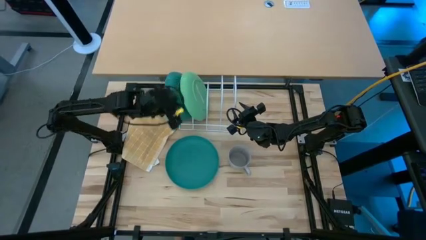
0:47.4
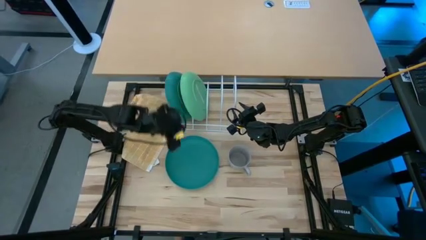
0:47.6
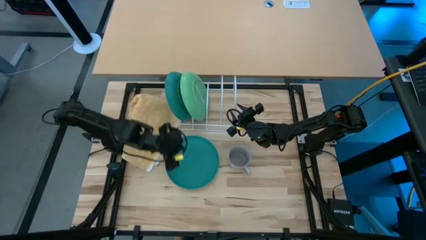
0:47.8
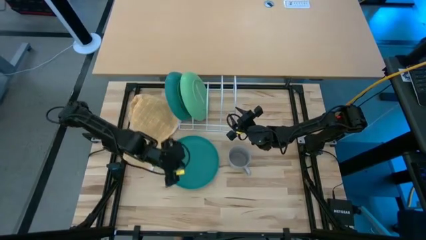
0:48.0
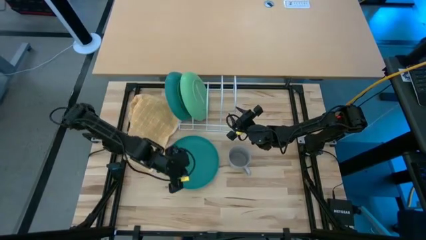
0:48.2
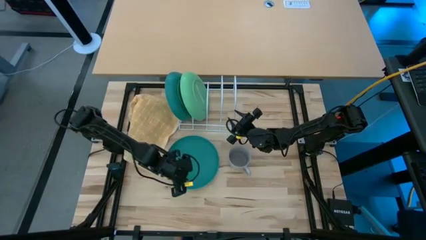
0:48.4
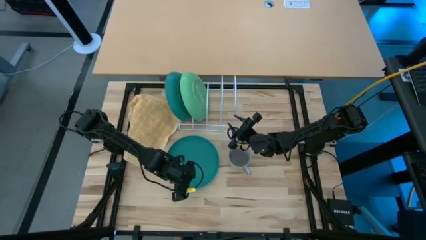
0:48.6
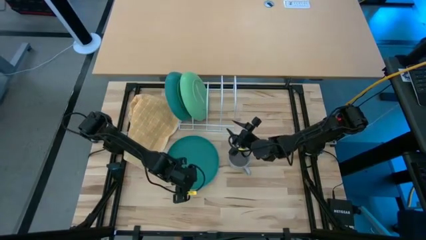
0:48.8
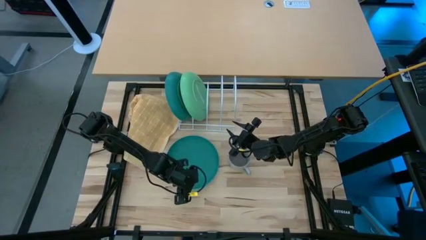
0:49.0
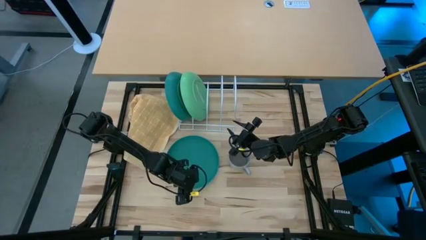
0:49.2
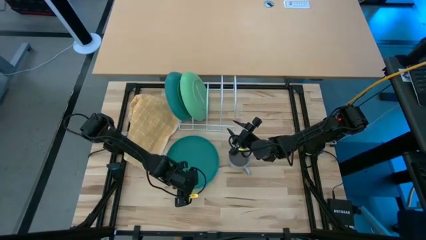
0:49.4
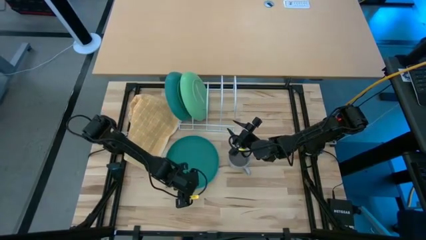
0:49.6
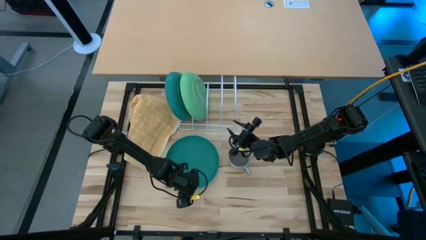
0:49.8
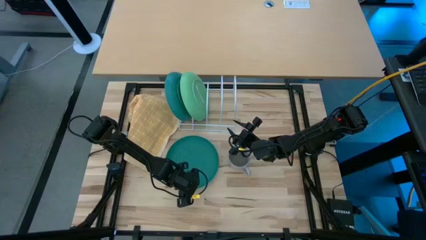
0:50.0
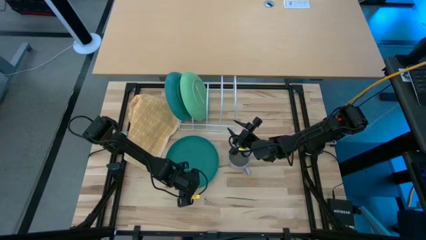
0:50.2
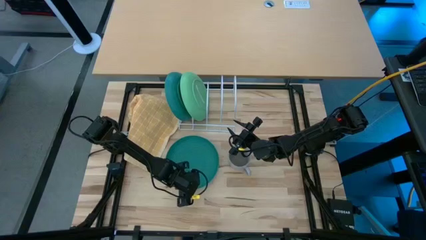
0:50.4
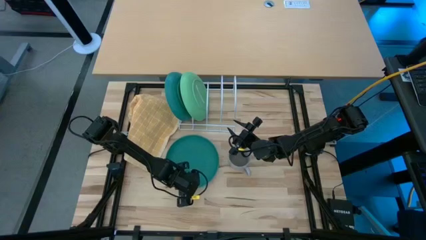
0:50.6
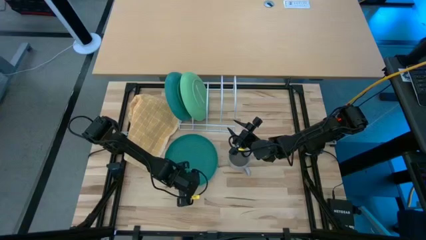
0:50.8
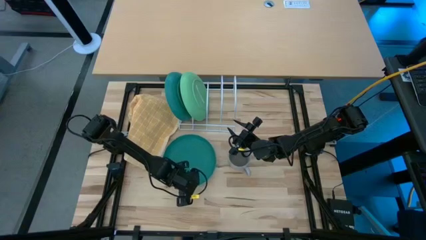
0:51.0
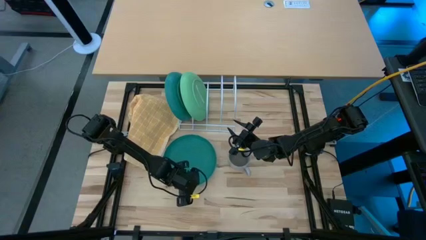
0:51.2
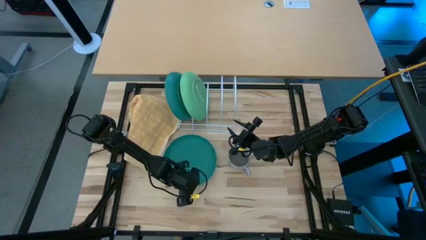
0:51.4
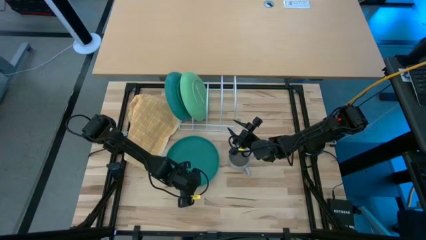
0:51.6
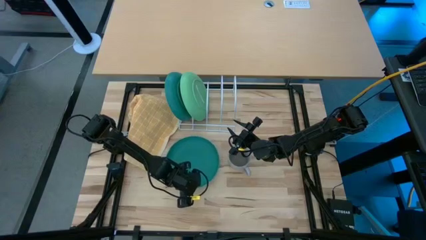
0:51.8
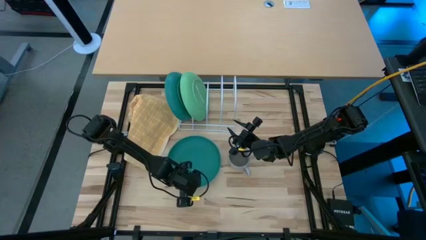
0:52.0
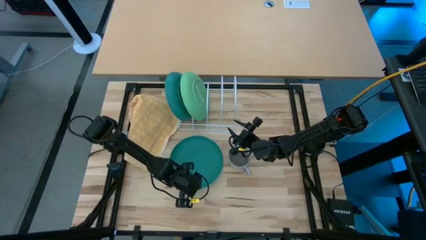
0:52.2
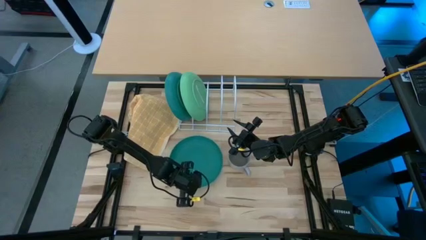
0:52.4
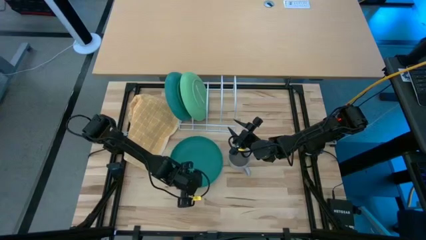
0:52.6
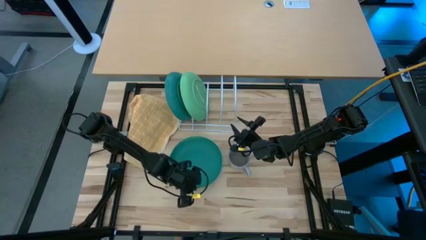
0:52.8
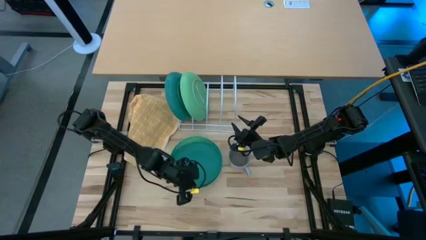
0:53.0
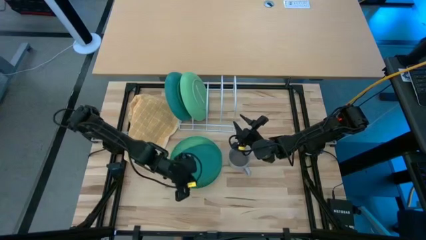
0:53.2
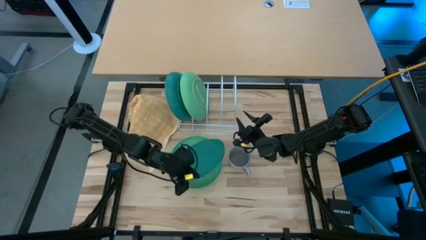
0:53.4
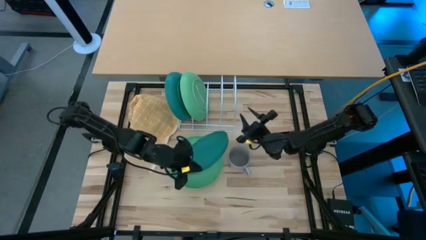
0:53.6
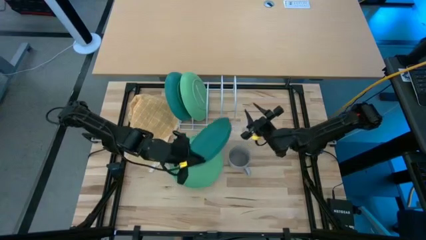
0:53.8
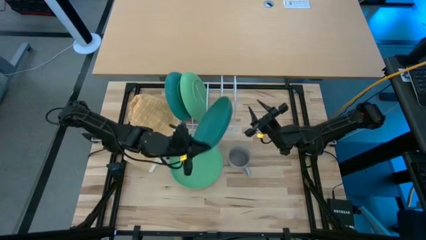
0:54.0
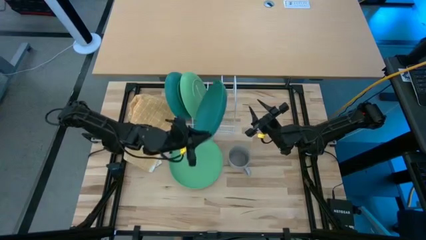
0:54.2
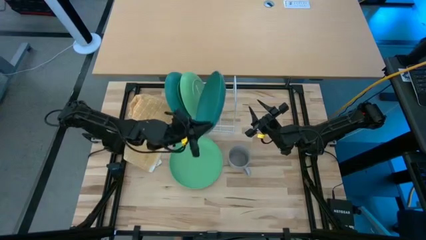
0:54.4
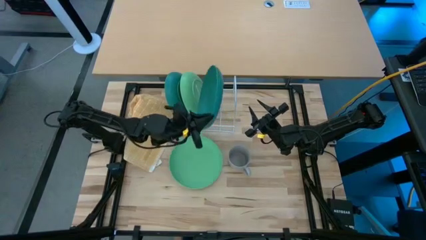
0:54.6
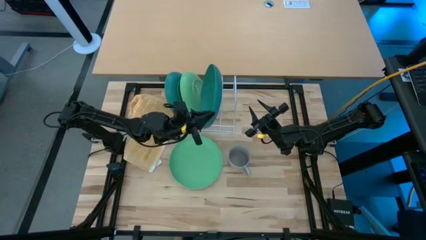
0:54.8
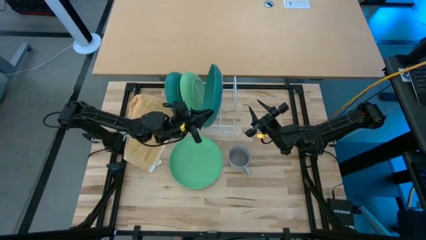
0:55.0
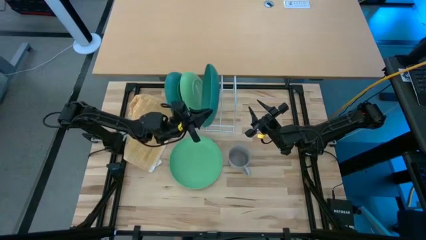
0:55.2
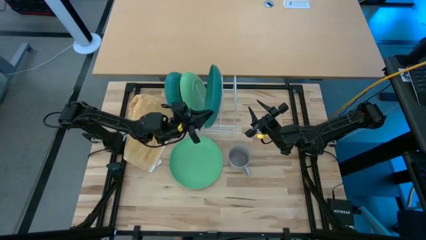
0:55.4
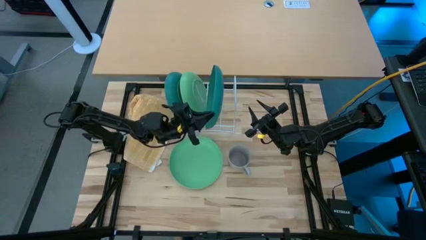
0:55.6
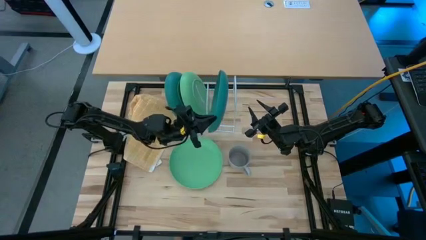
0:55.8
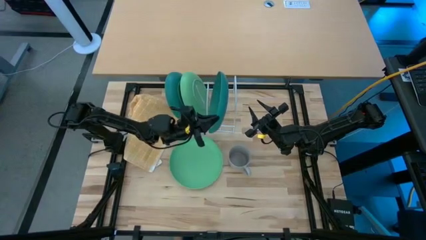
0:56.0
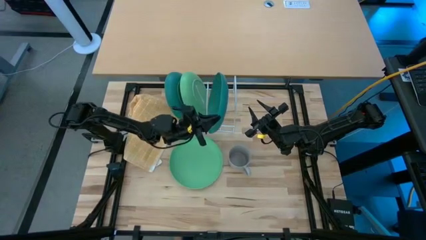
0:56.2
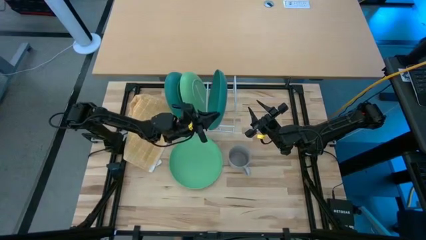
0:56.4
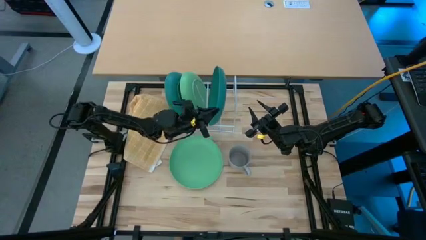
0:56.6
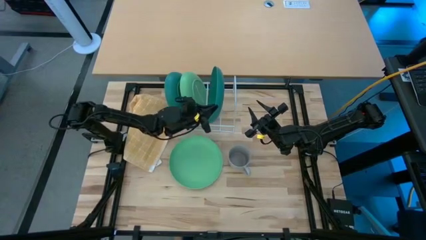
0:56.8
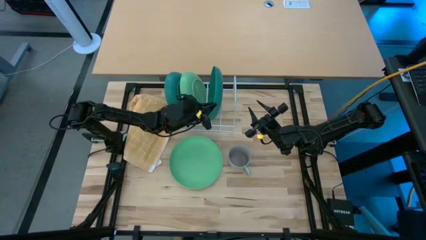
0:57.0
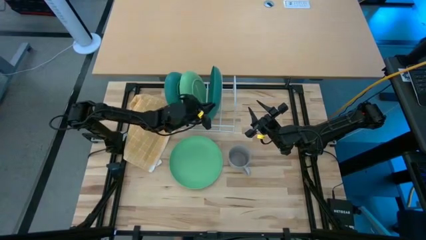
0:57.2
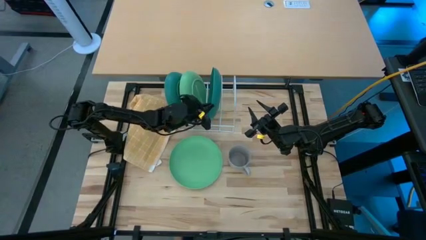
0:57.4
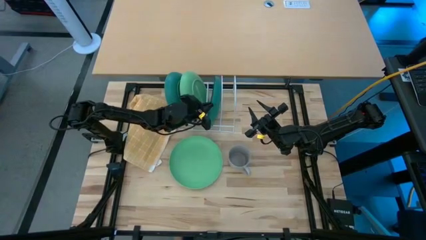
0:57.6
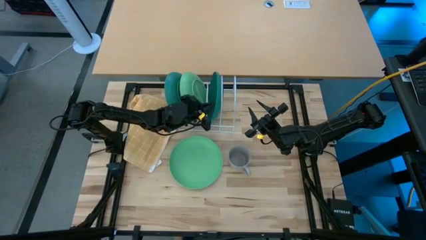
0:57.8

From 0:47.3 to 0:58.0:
Task: Sort dishes
Put the blue plate into the dish rack

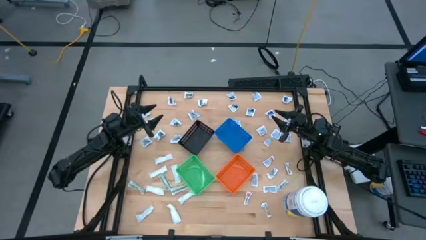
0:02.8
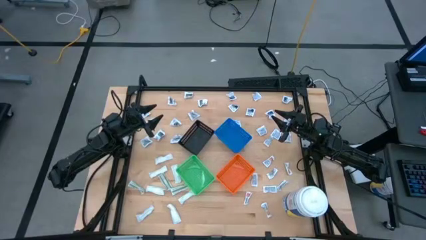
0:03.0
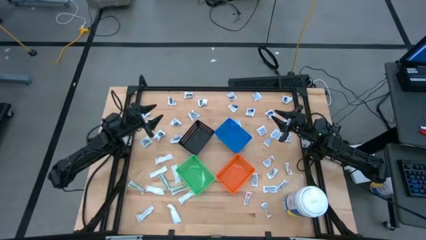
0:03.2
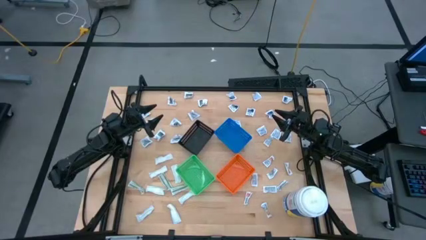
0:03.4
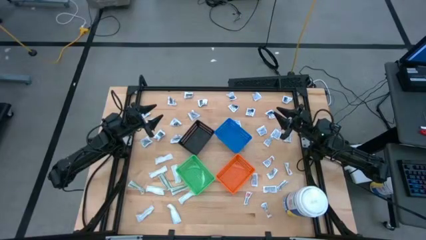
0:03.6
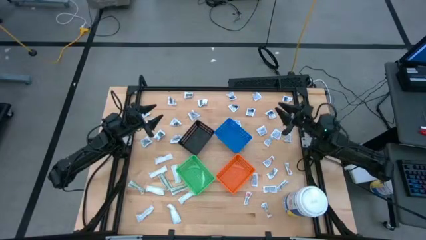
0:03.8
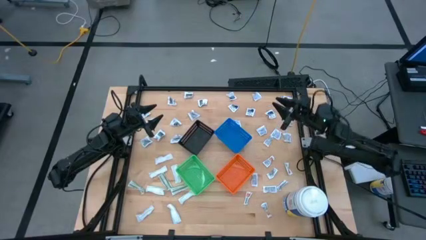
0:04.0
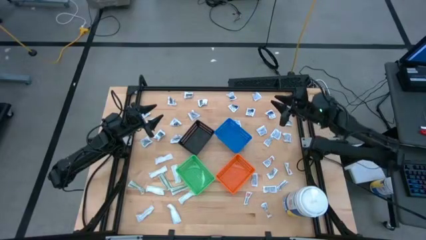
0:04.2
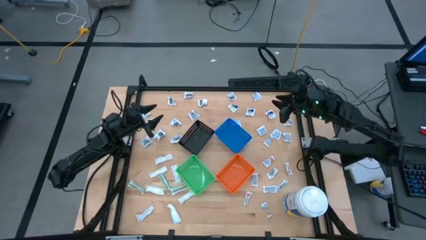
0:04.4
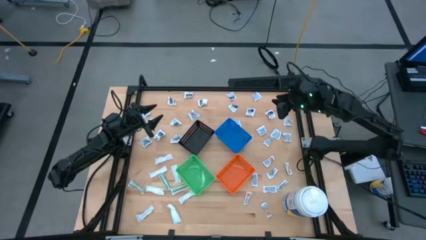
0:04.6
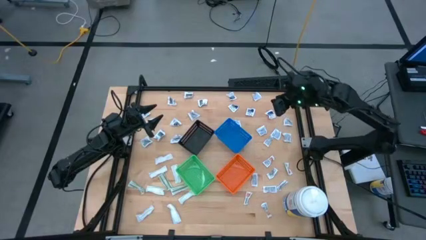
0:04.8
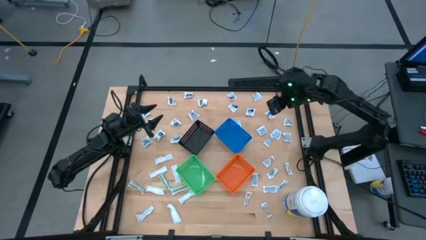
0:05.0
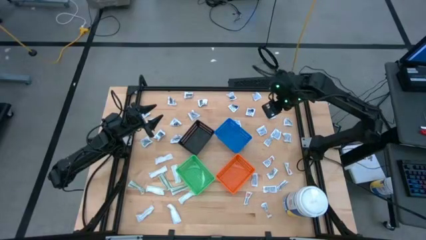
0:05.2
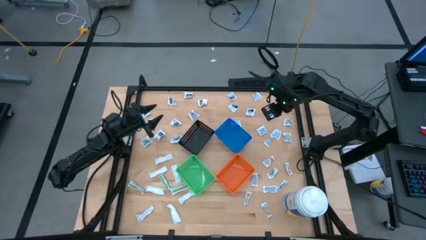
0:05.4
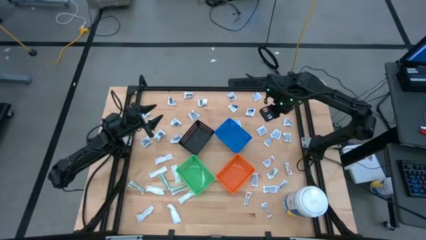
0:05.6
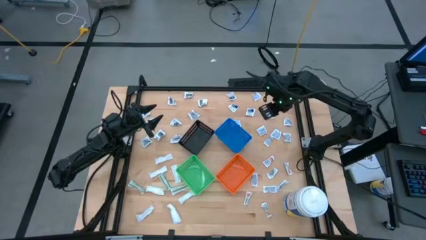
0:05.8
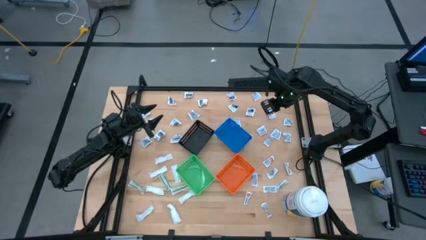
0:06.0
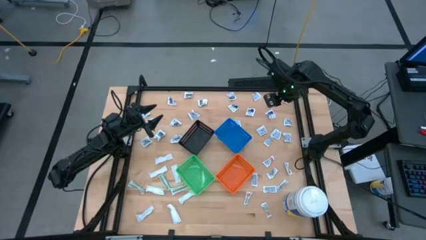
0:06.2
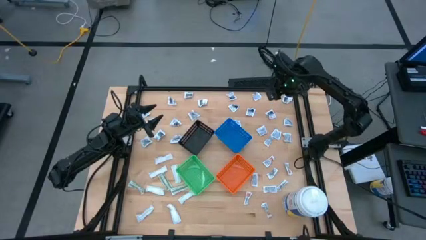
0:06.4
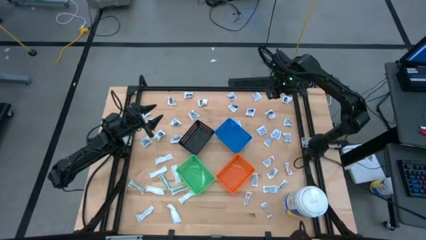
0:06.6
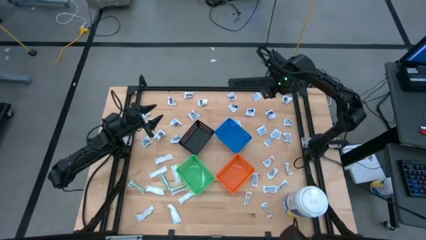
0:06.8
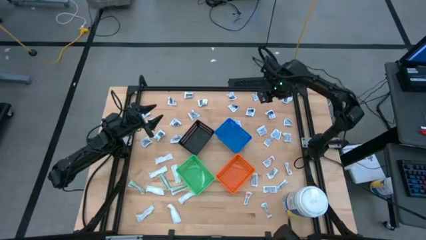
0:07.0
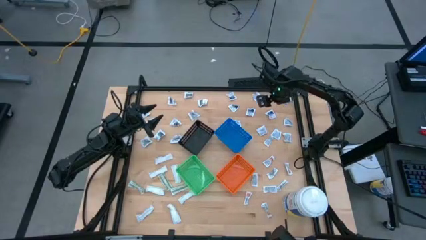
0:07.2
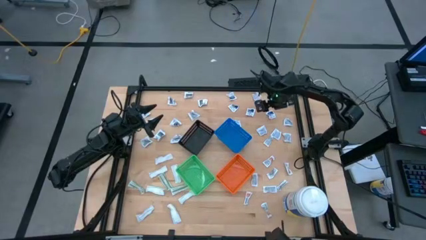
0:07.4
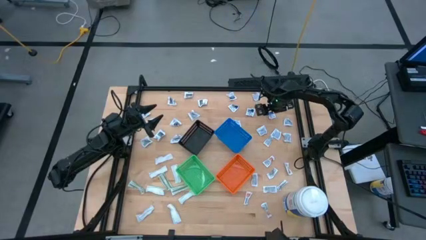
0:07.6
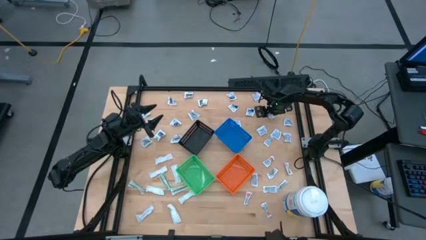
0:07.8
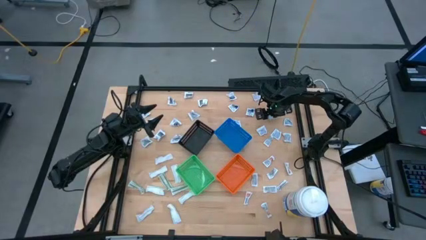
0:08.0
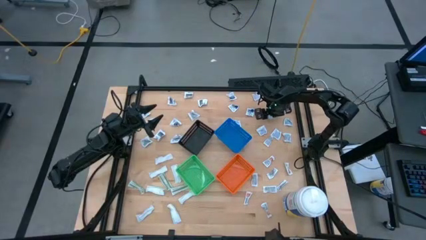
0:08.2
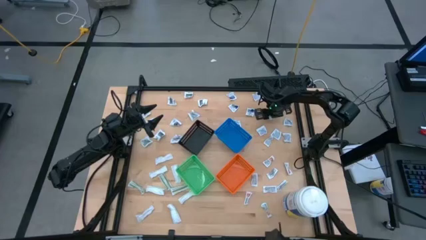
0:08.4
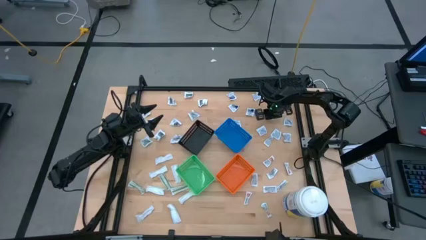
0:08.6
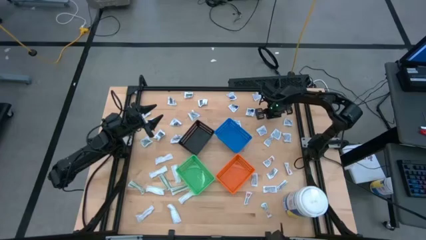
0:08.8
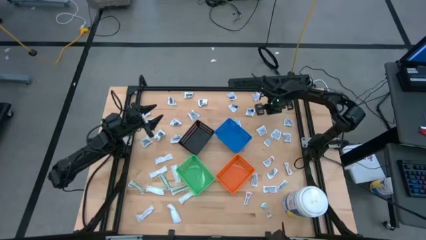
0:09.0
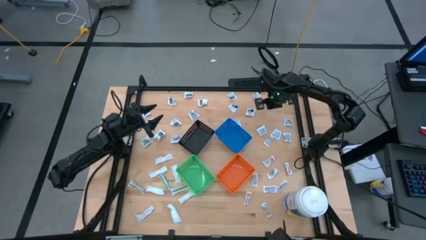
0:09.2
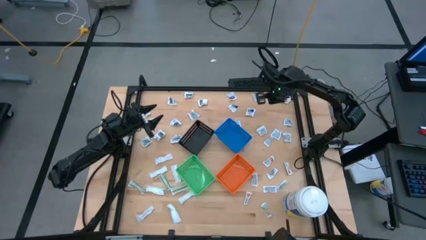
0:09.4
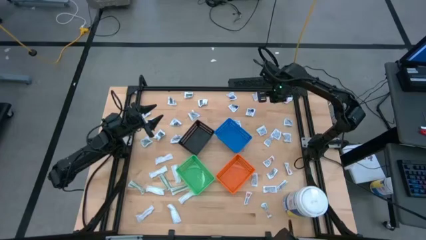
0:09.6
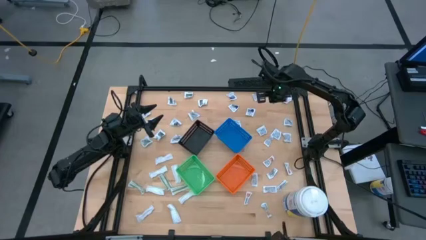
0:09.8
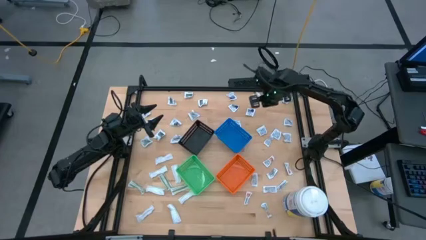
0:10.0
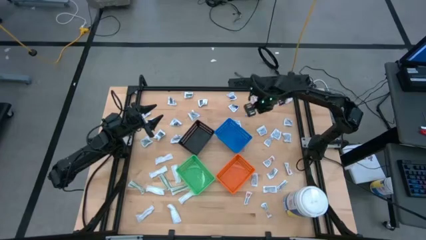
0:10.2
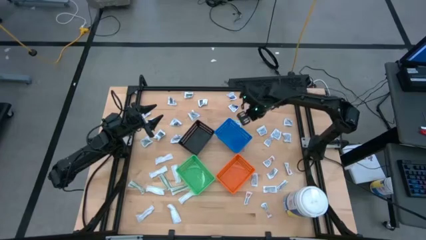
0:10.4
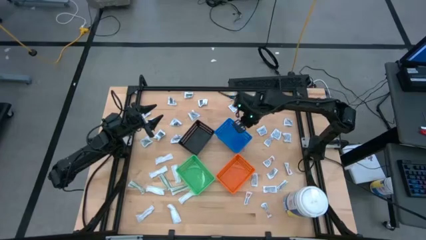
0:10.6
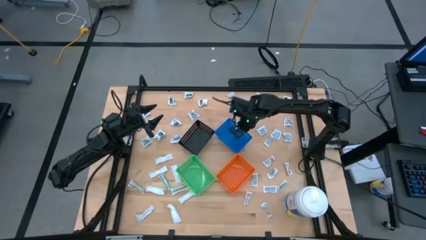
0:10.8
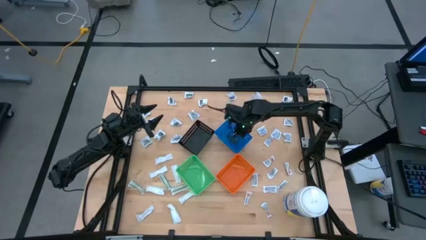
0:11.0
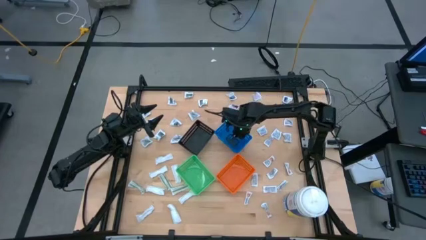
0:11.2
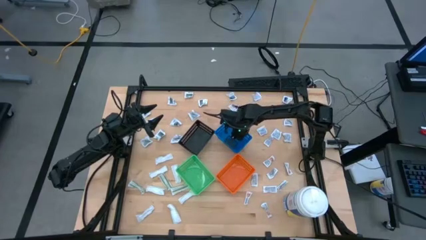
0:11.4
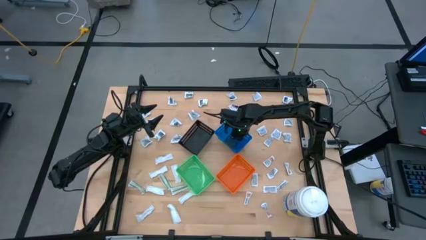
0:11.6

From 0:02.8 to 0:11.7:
Task: Pick & Place First Aid Supplies
Put the blue alcohol pad into the blue bin
